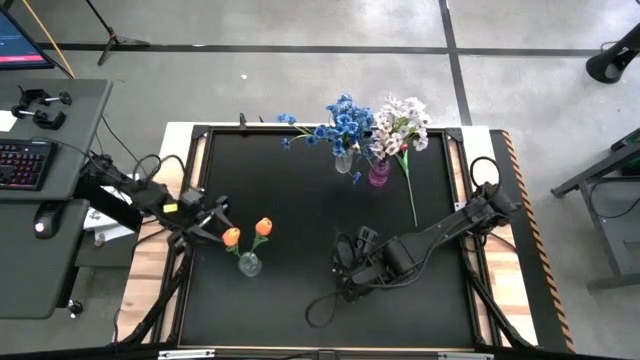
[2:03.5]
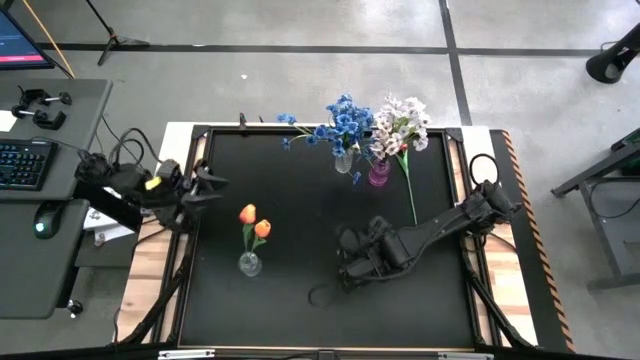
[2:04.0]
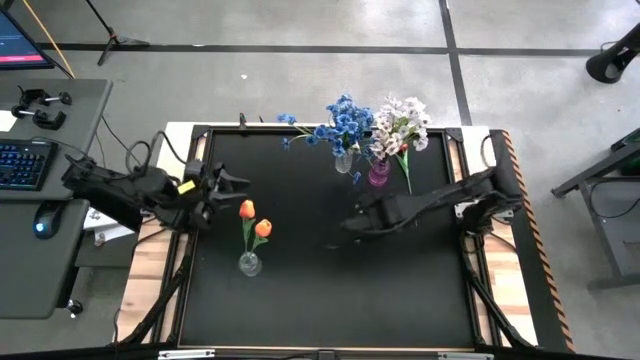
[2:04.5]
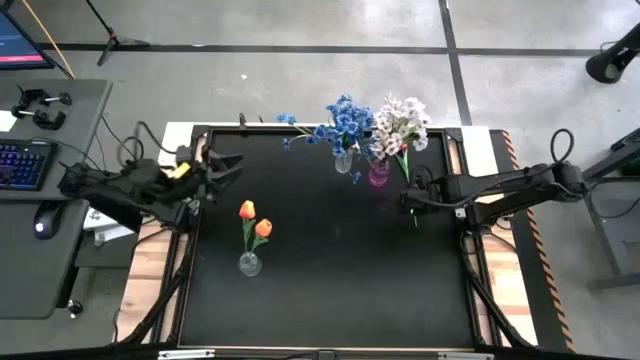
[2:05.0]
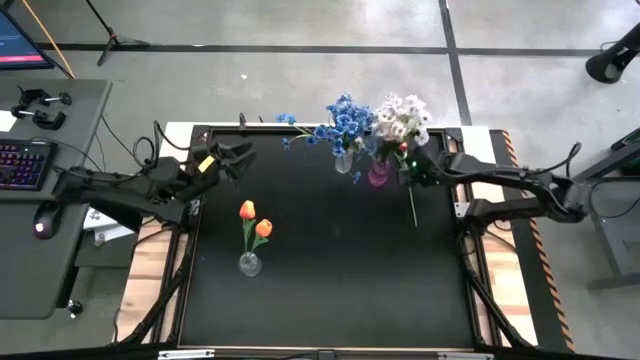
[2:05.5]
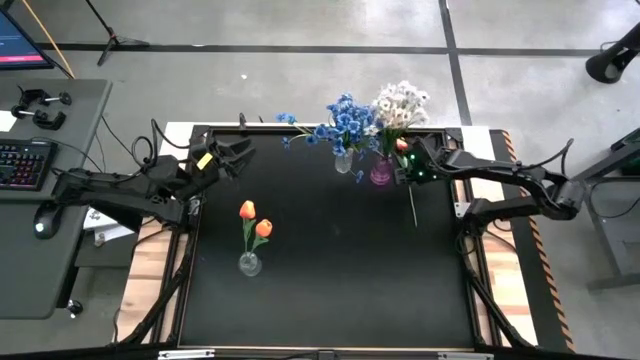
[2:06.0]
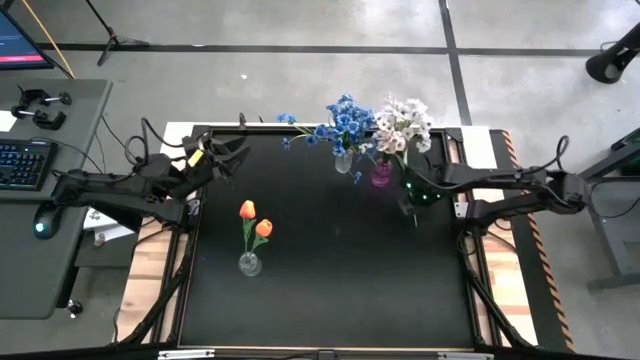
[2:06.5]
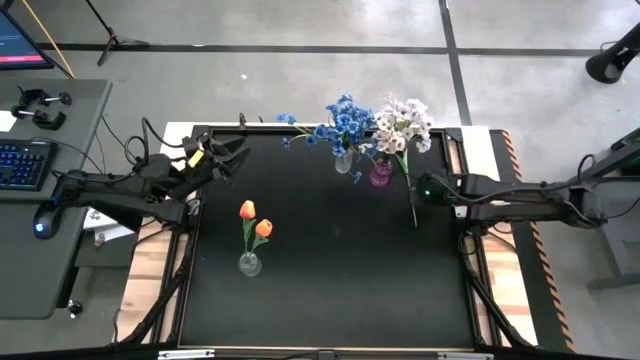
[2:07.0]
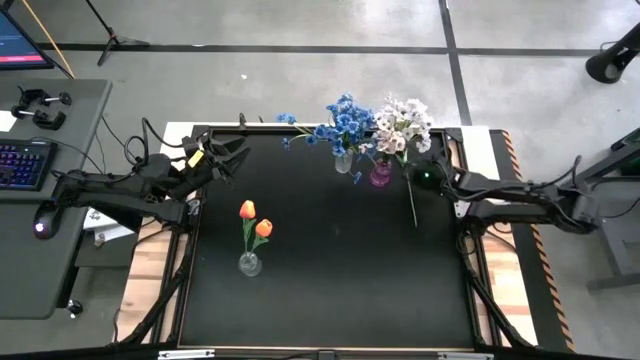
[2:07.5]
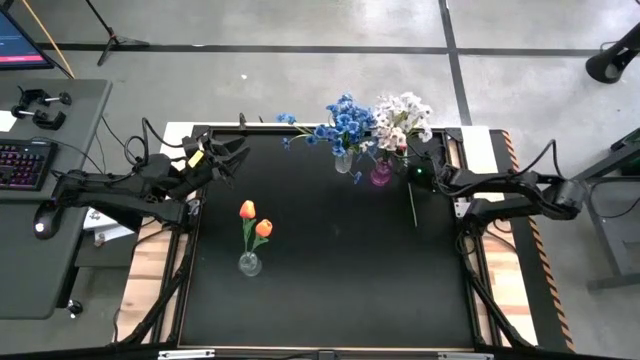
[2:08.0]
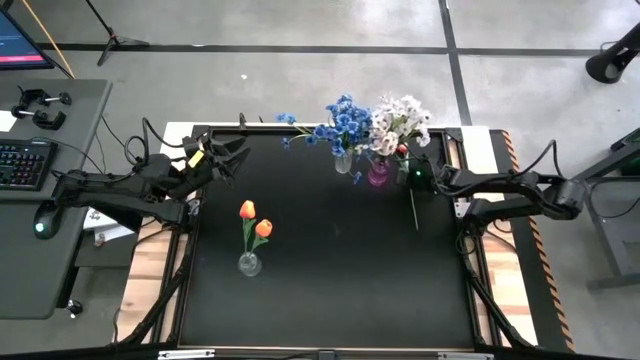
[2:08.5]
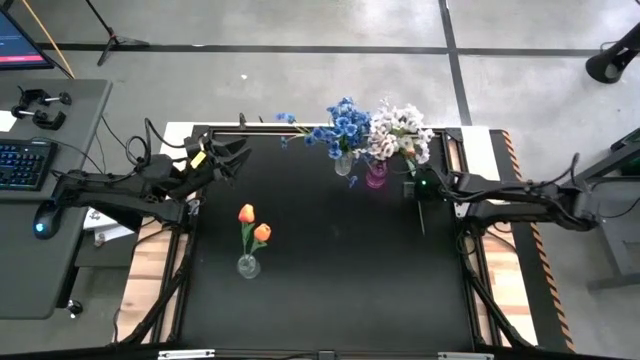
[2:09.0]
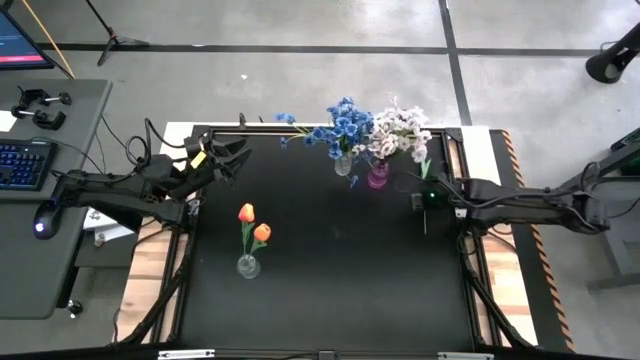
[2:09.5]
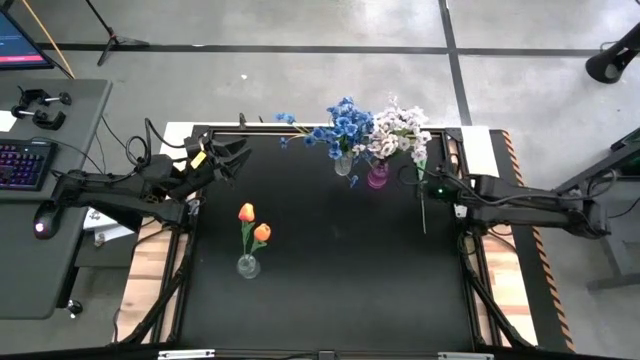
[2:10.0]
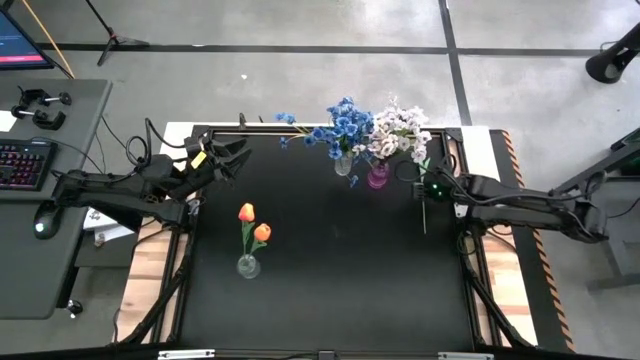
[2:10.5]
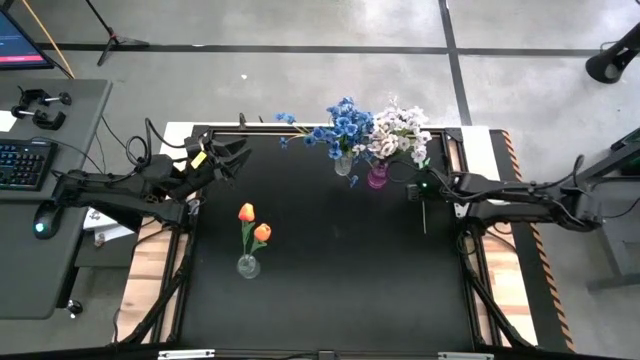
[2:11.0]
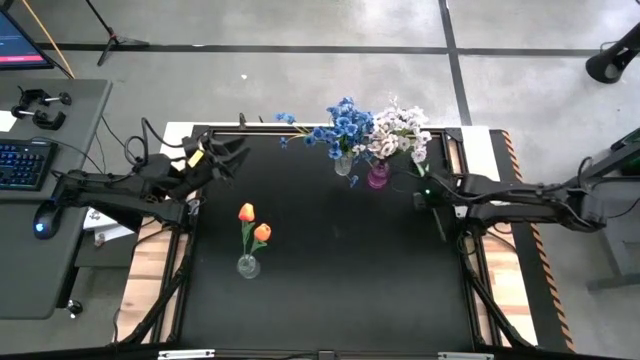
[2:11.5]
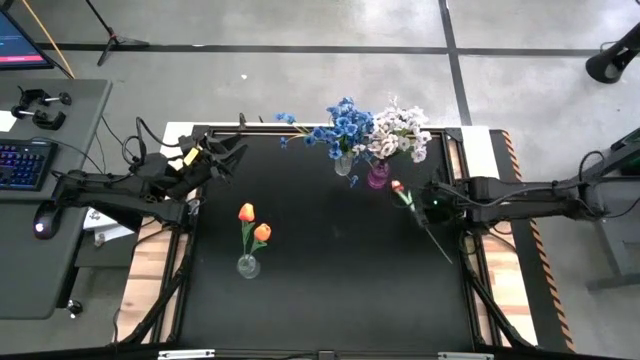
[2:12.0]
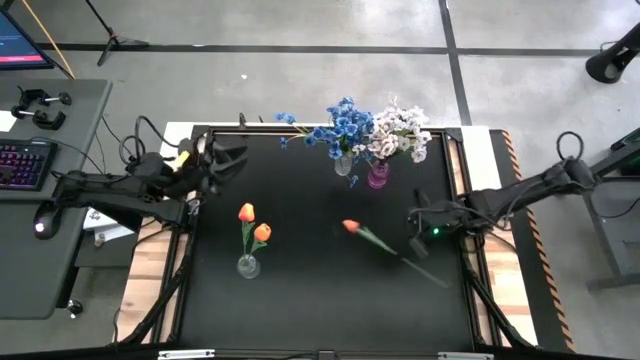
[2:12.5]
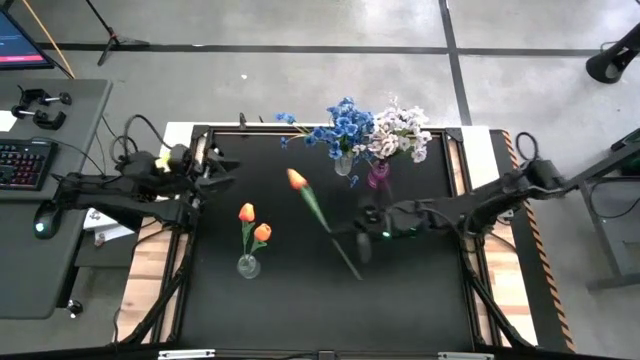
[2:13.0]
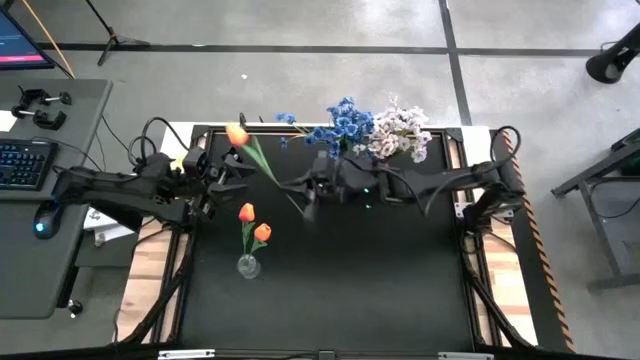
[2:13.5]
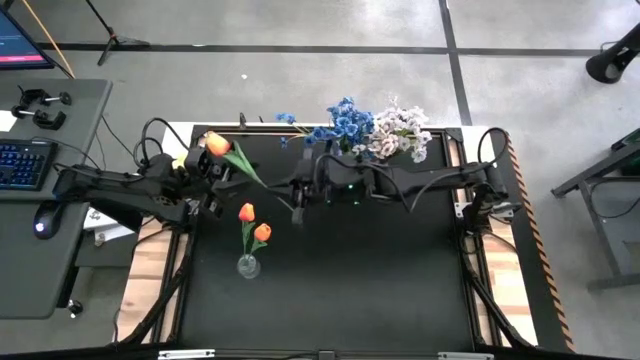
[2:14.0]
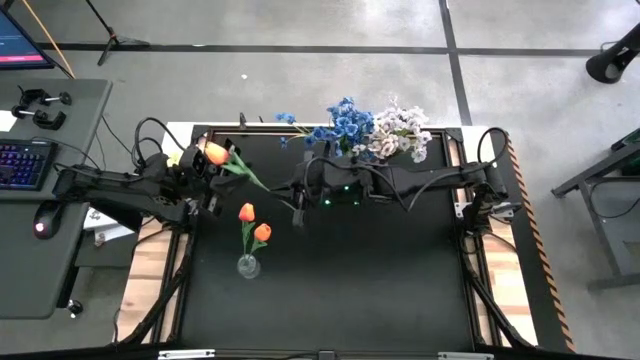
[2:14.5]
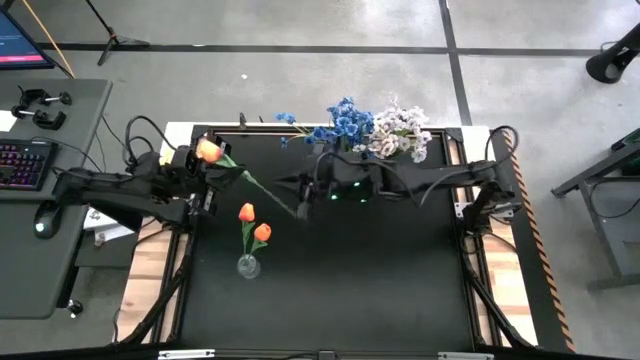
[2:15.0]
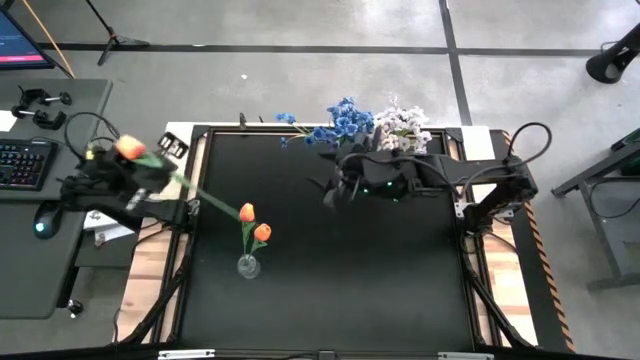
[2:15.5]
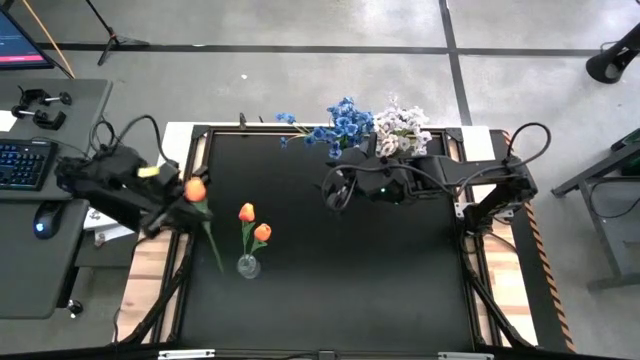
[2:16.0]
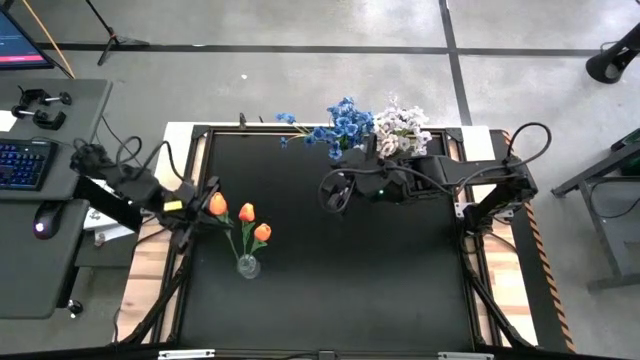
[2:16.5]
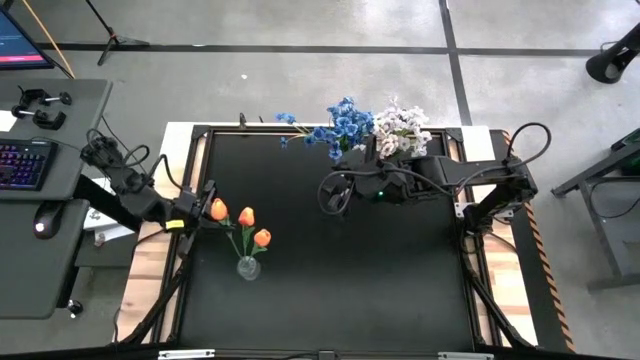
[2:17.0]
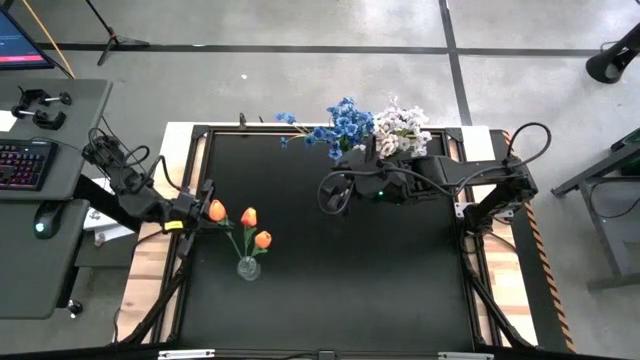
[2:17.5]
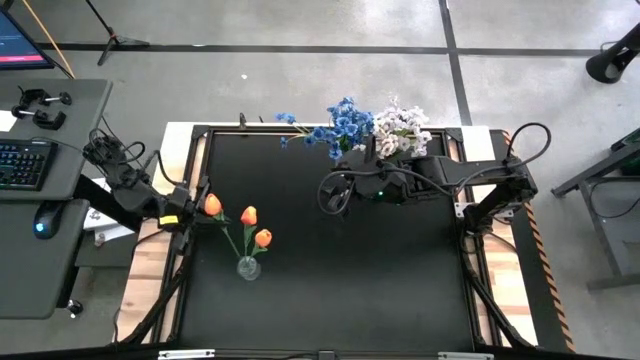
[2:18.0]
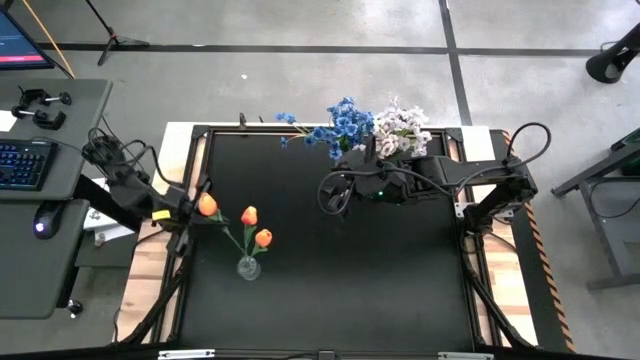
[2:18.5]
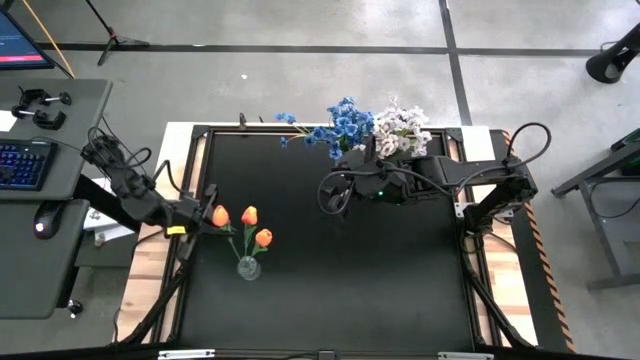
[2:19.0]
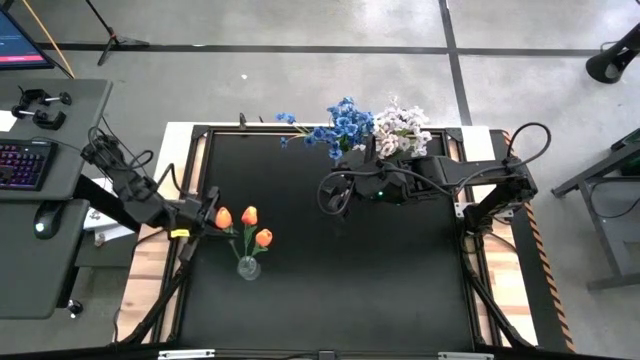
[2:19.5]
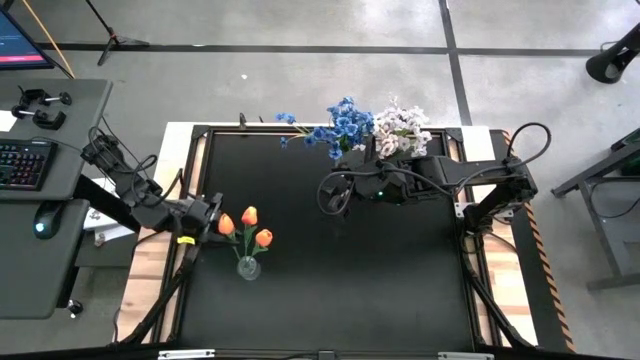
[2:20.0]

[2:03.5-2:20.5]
Task: Sort flowers into vase by color
Put the orange flowers into the bottom transparent vase

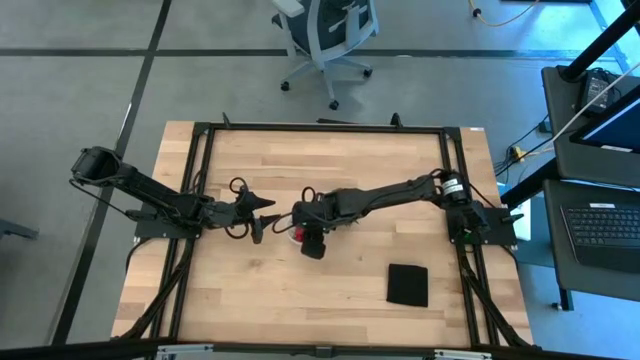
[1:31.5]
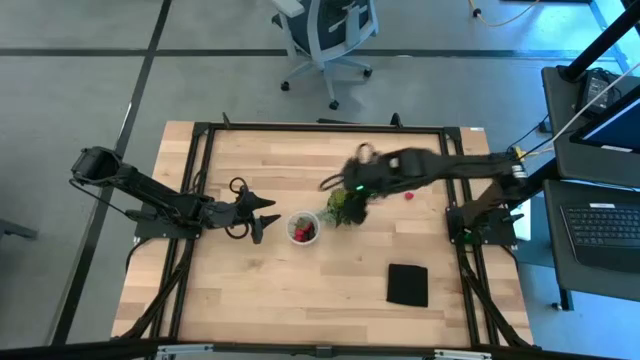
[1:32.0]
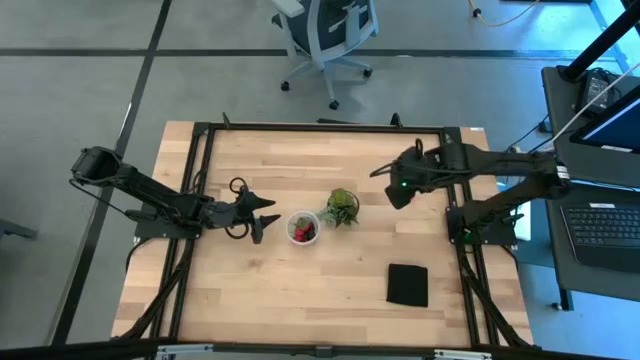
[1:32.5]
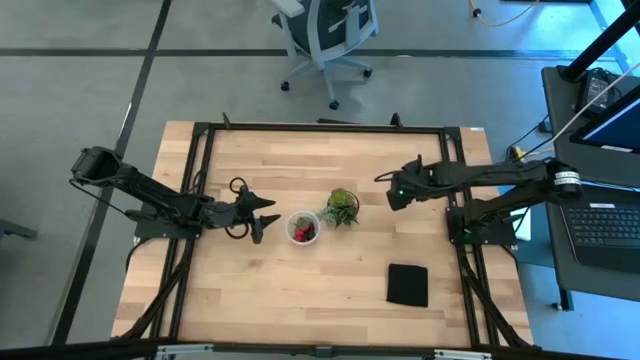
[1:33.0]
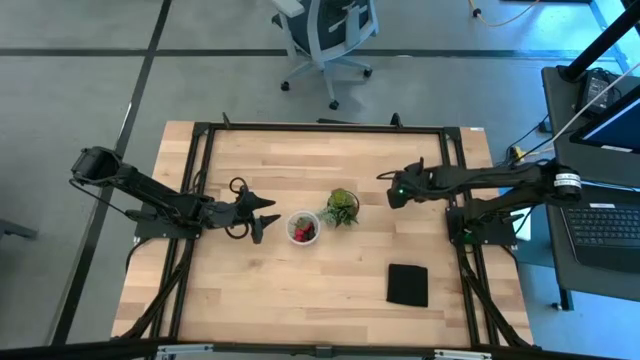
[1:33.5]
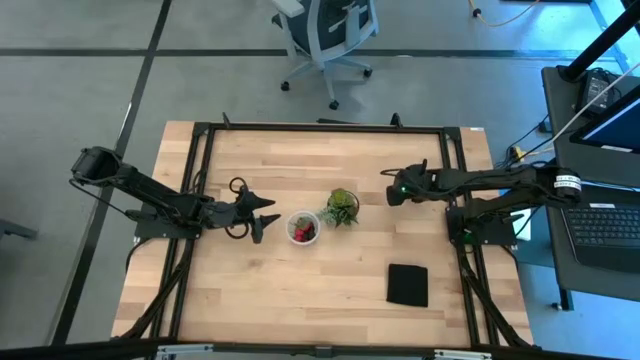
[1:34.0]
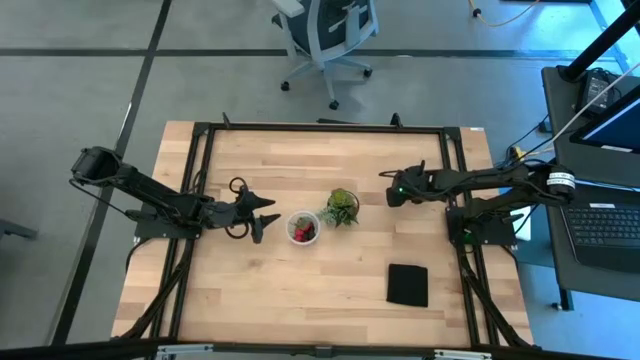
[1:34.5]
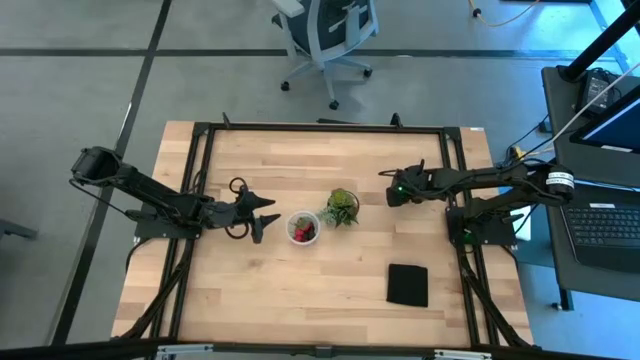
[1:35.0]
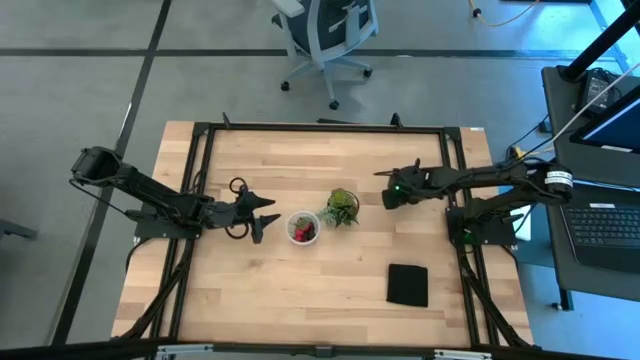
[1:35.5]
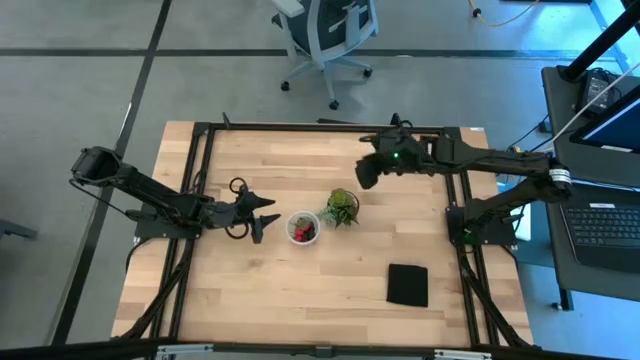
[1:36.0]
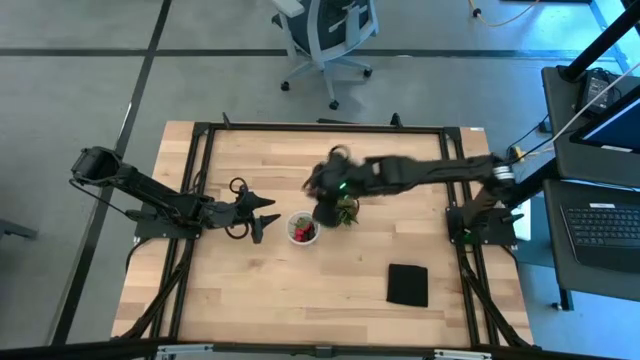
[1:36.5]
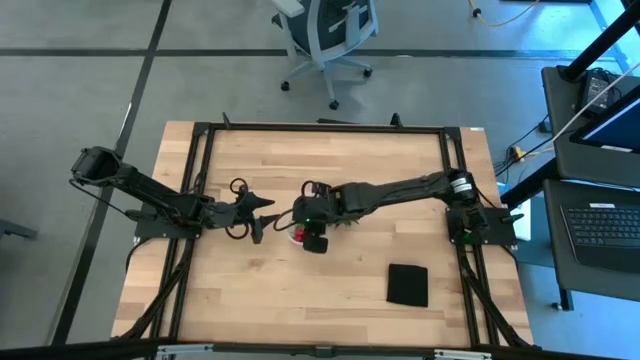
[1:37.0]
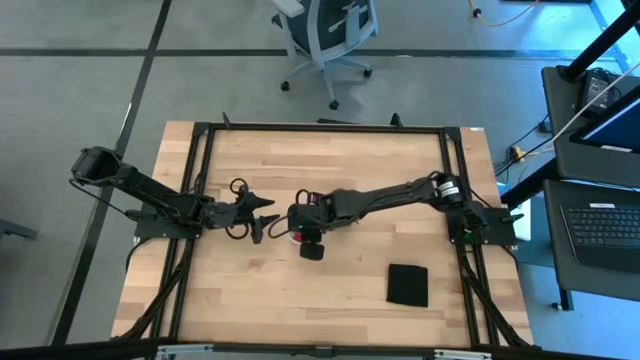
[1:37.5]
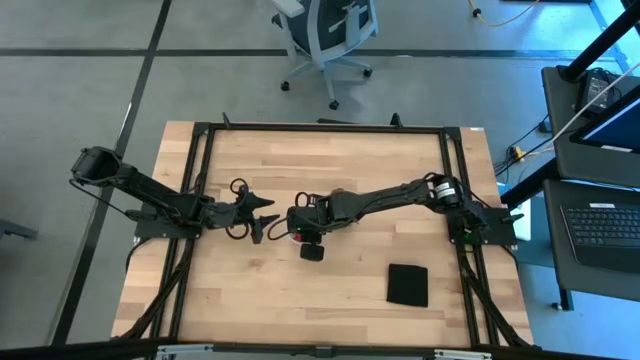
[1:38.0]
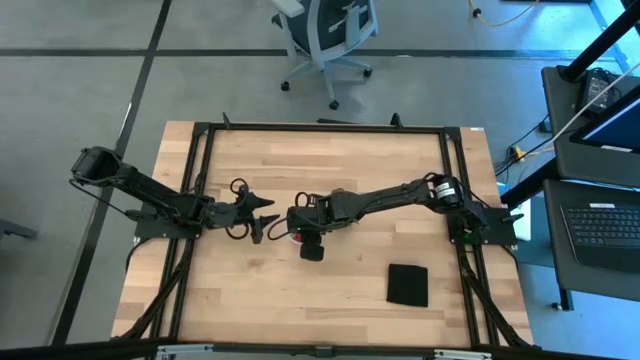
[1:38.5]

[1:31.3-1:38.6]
Task: Pick and placing Produce into tupperware
Put the raspberry into the transparent container
